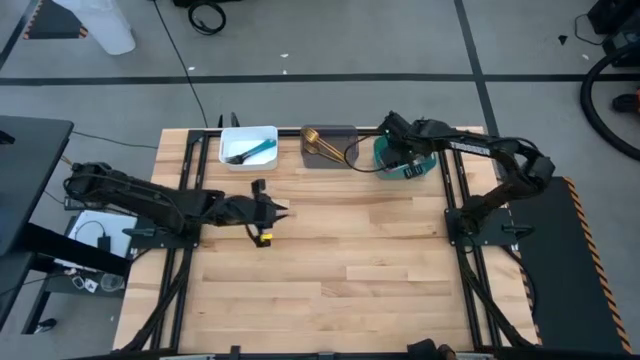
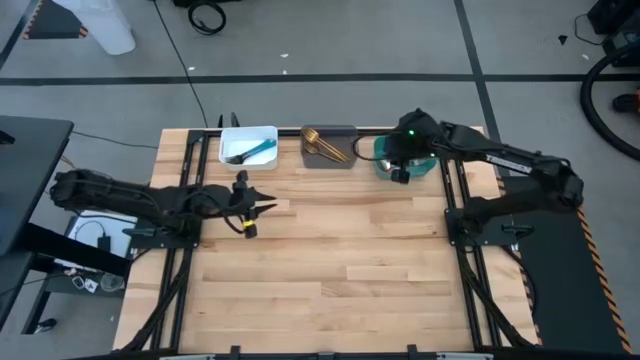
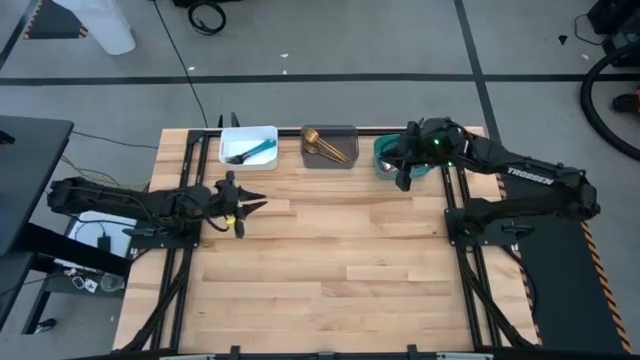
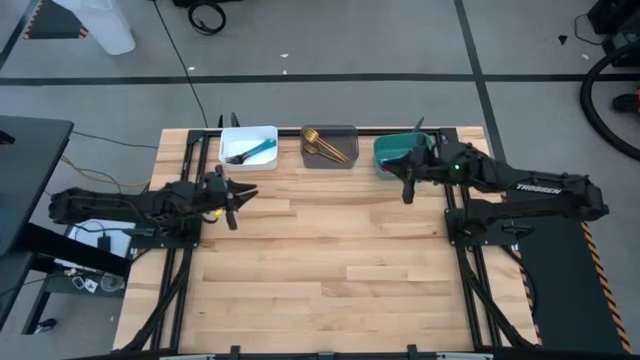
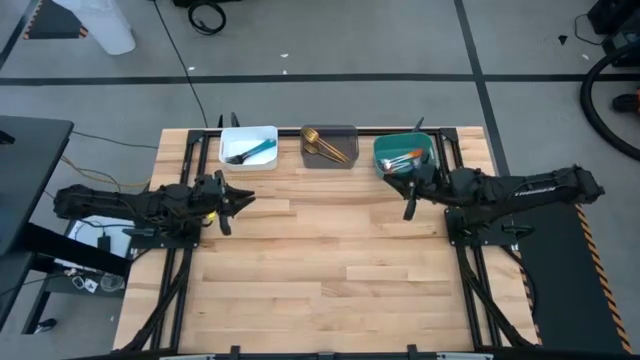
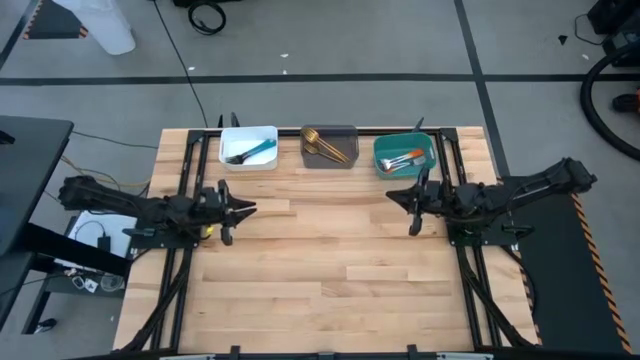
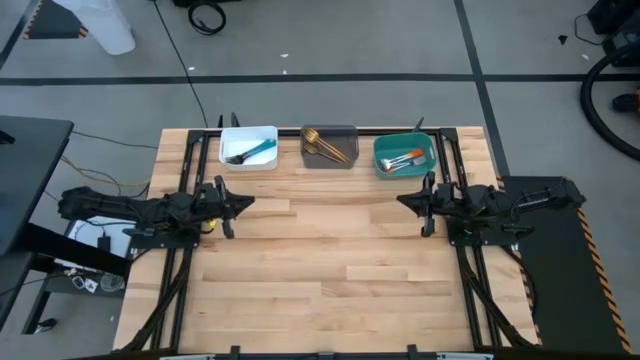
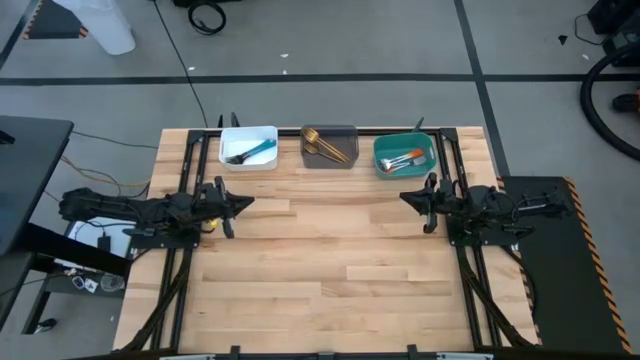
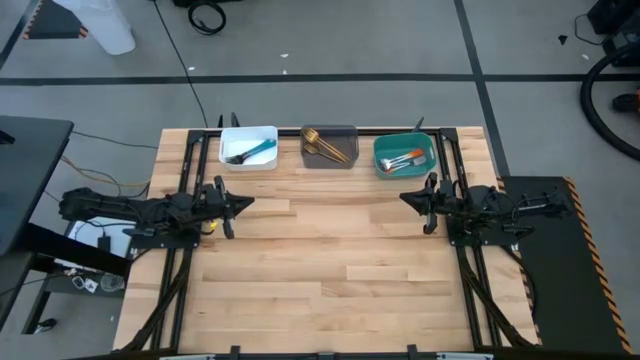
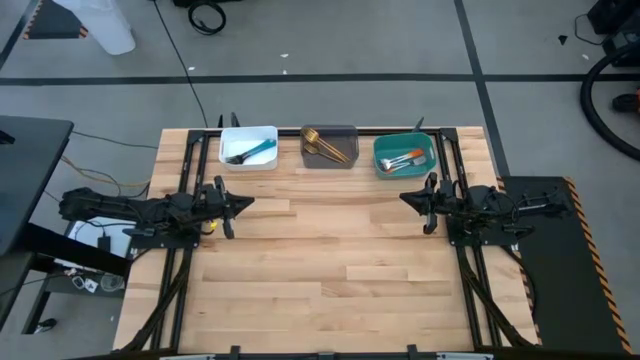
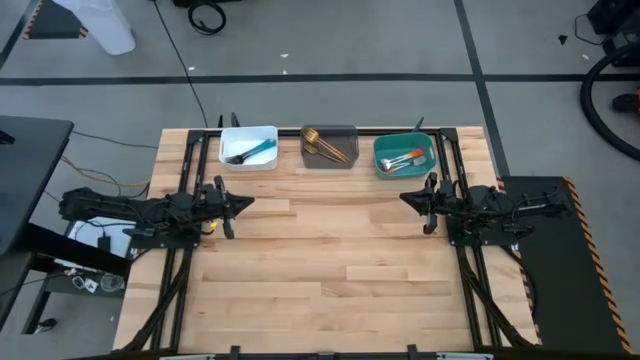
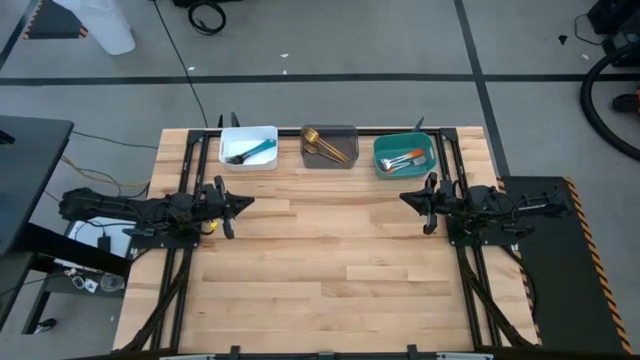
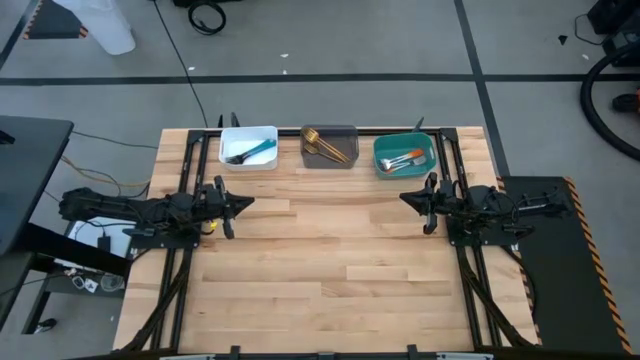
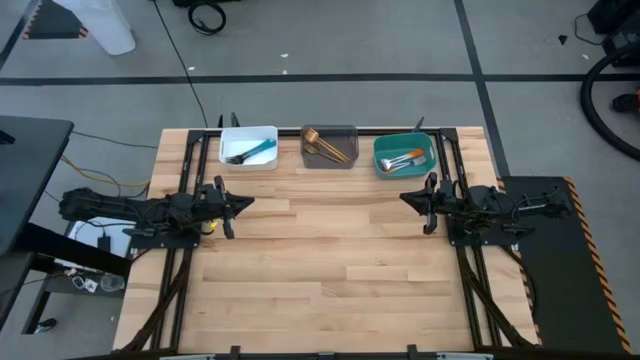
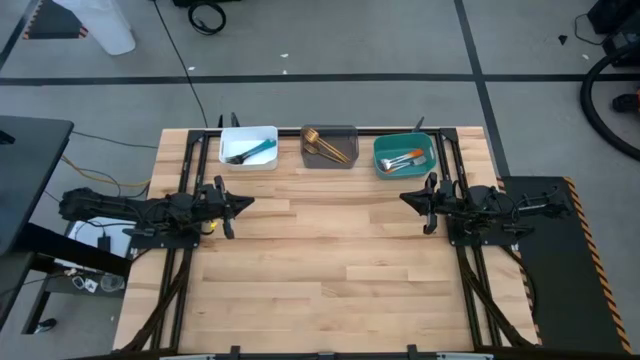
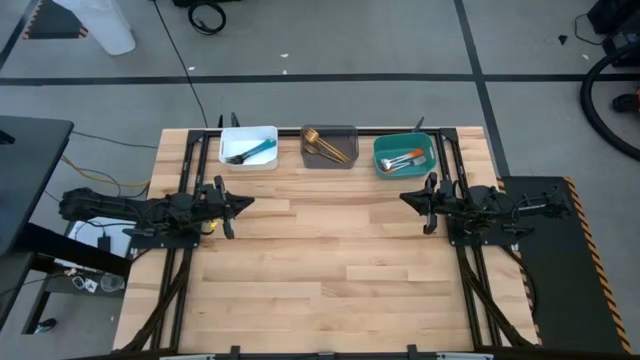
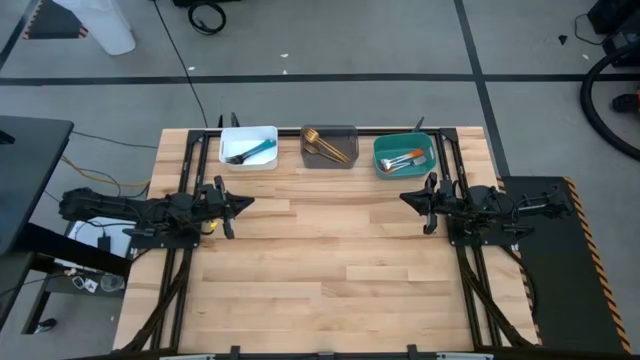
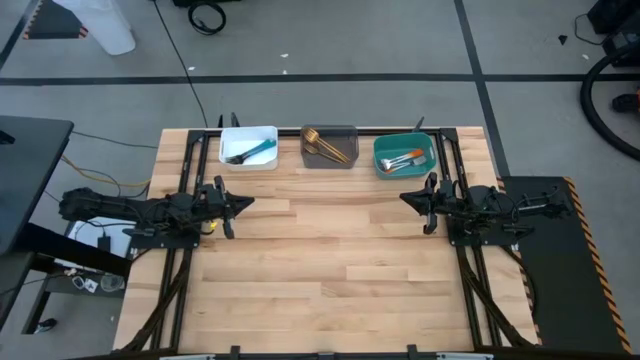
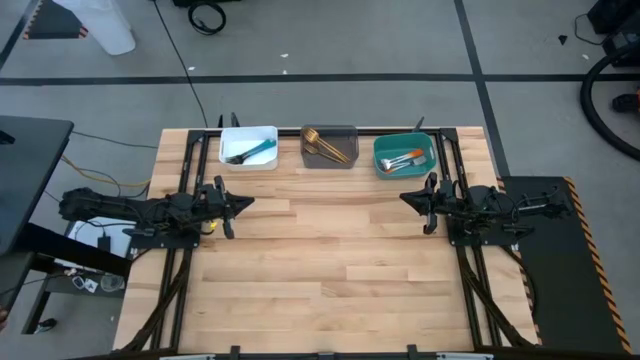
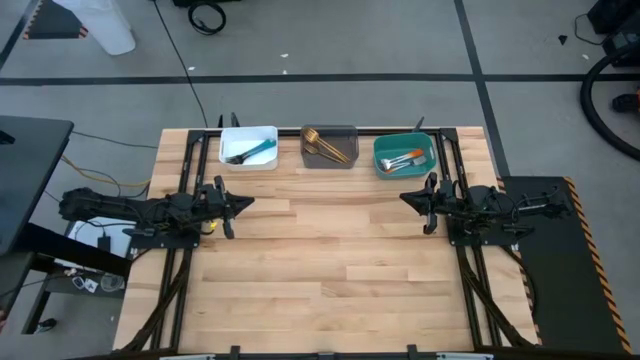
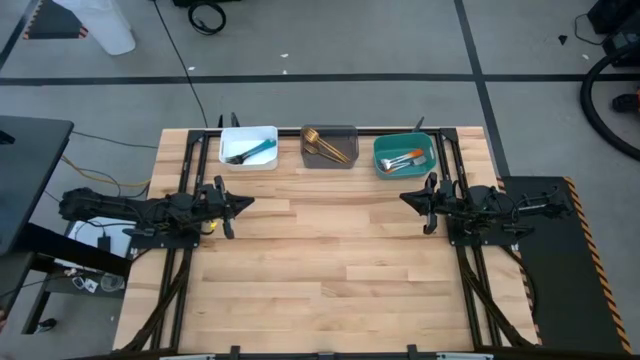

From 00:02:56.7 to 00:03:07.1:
Task: Sort silverware by color (type)
Return to Home Position

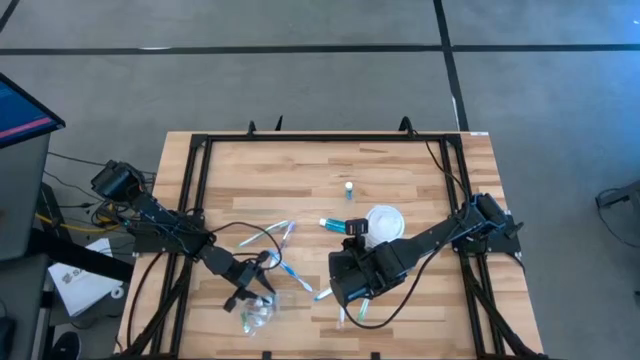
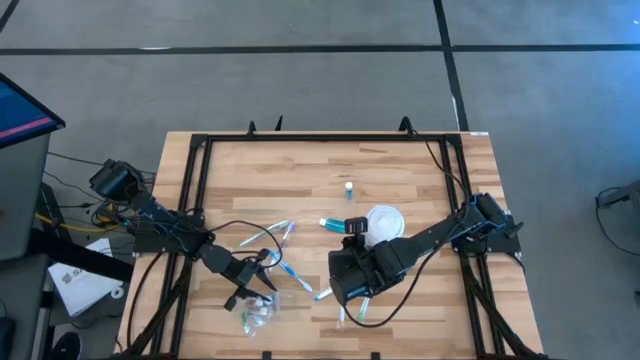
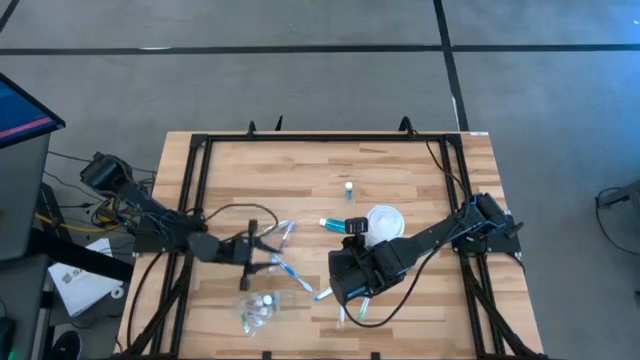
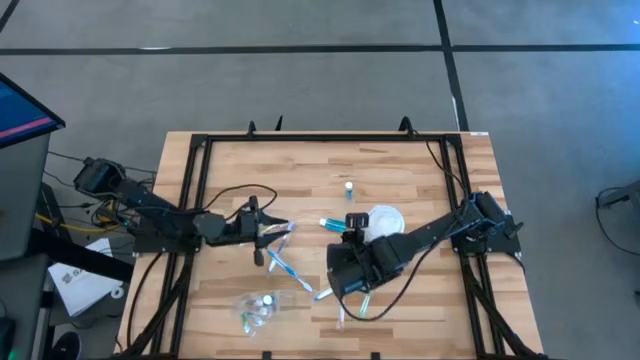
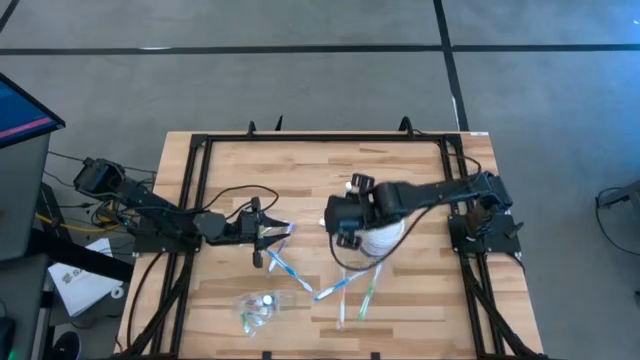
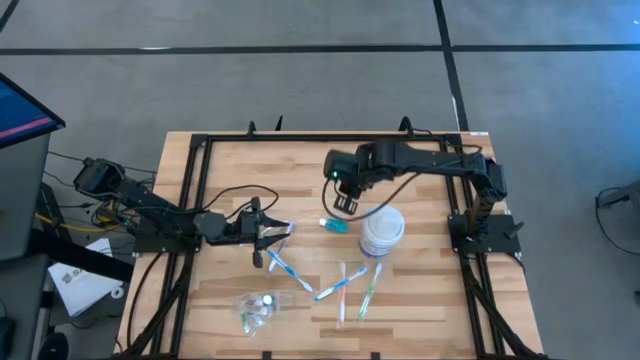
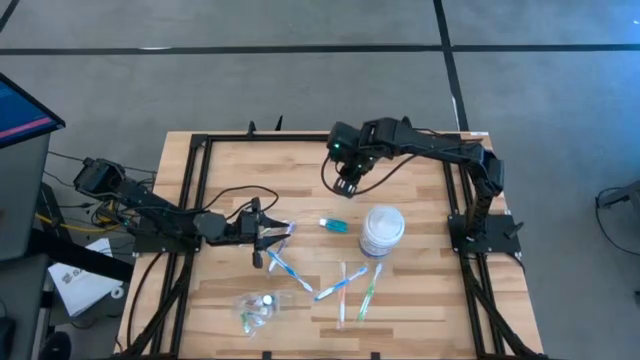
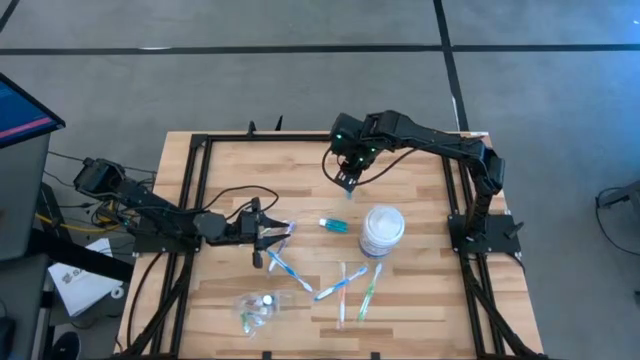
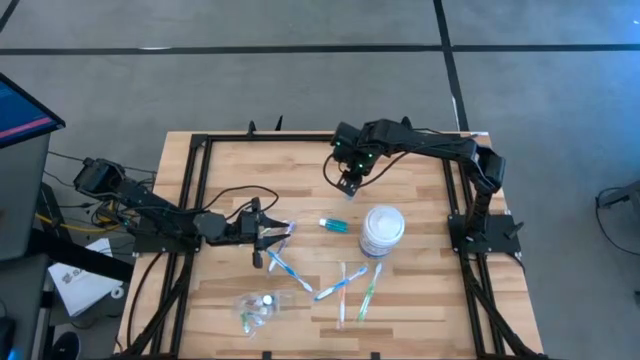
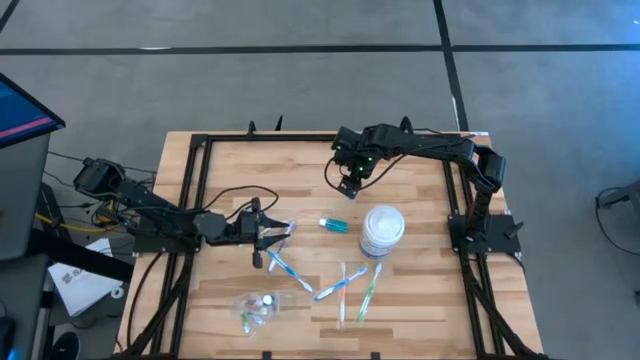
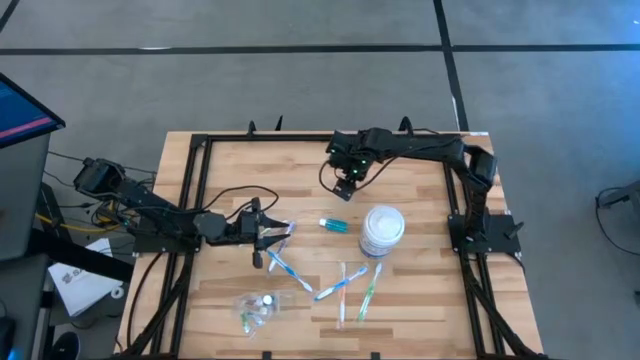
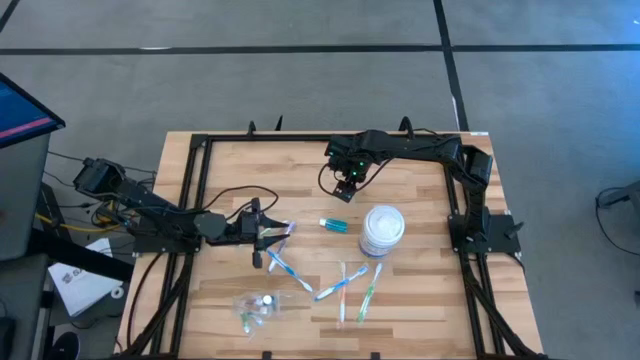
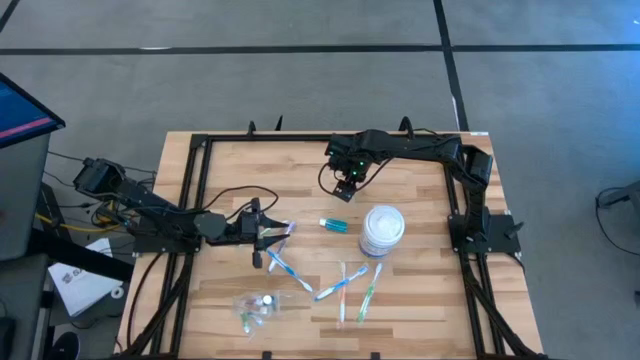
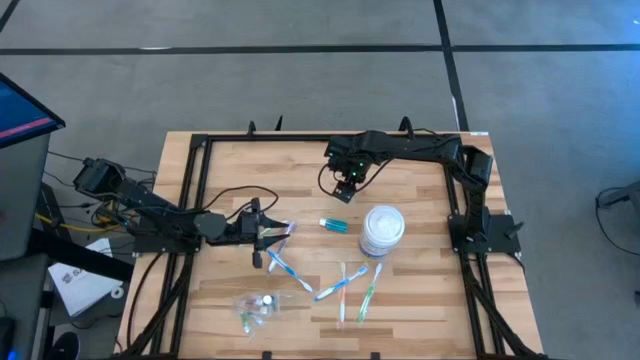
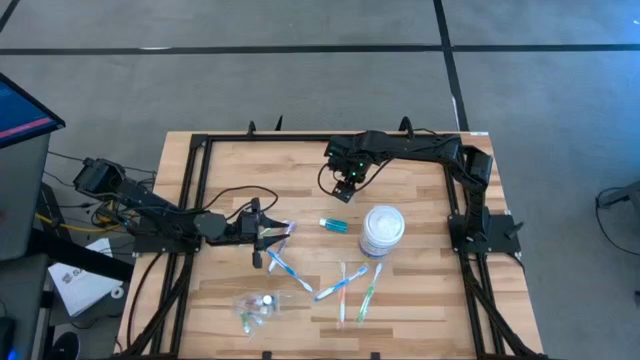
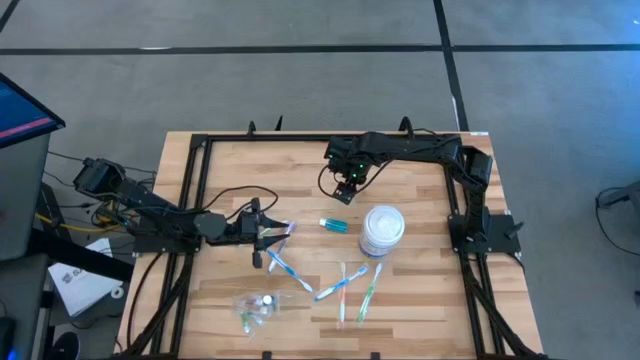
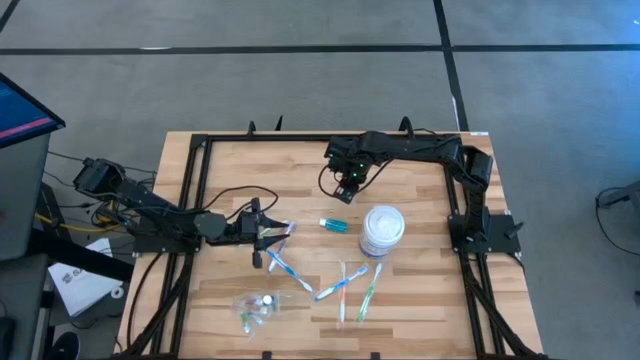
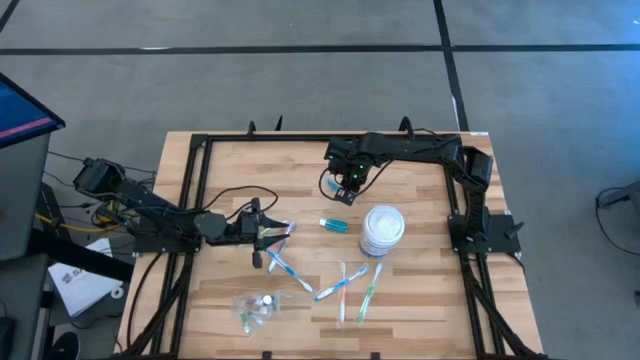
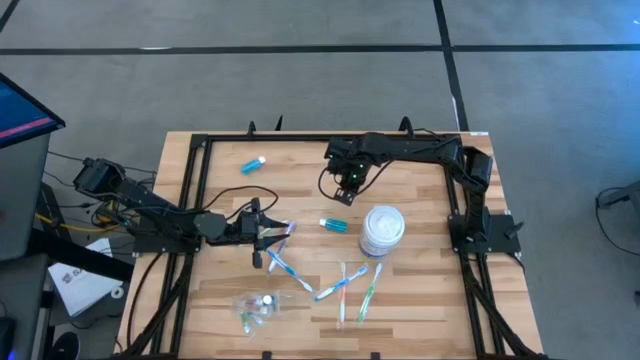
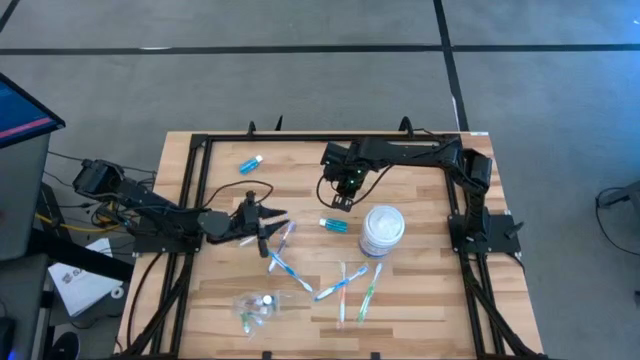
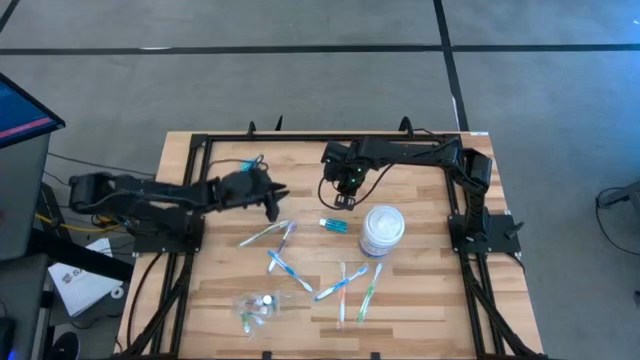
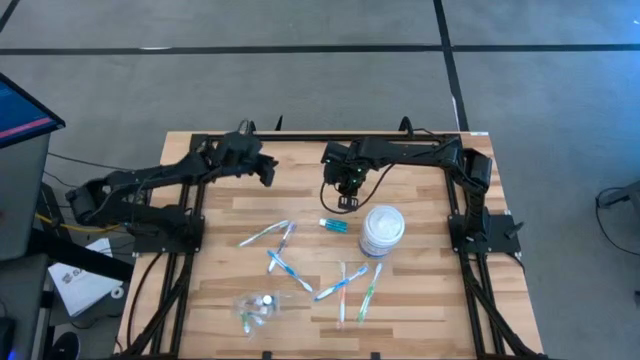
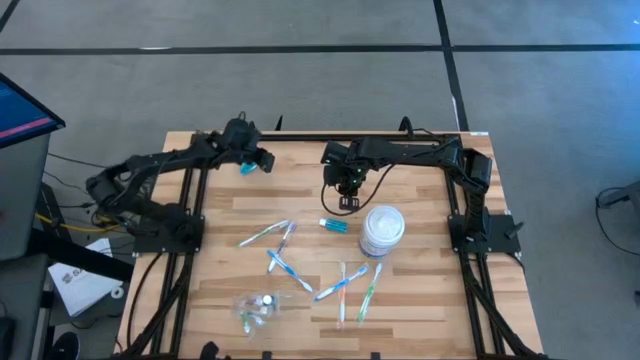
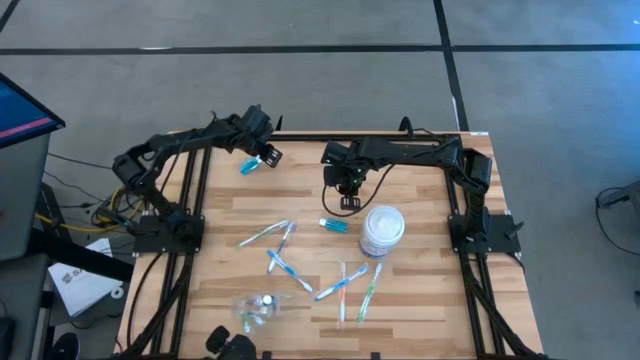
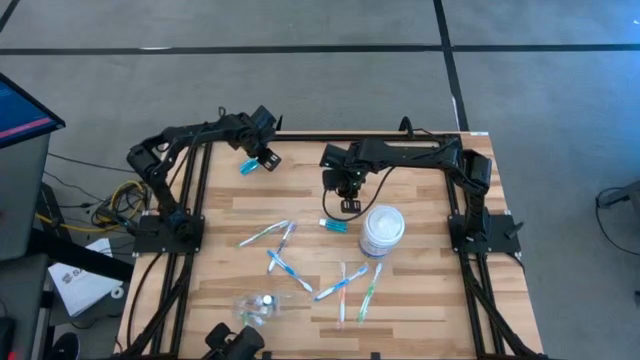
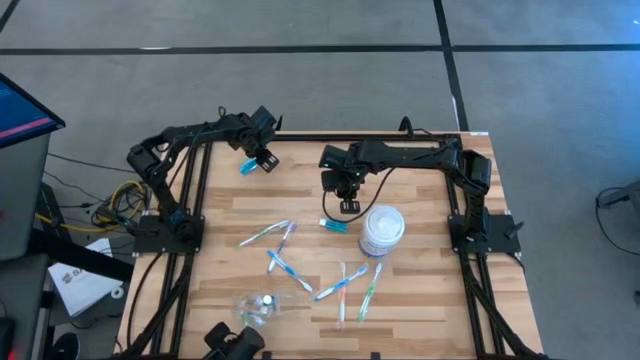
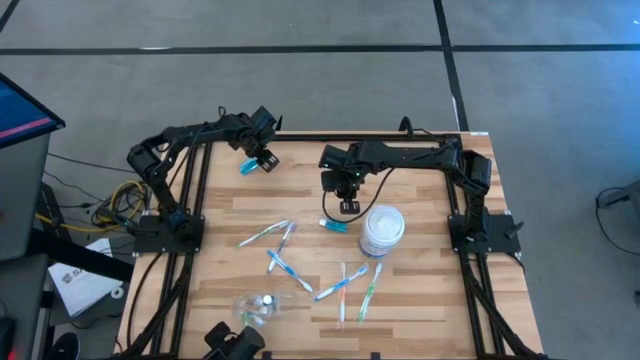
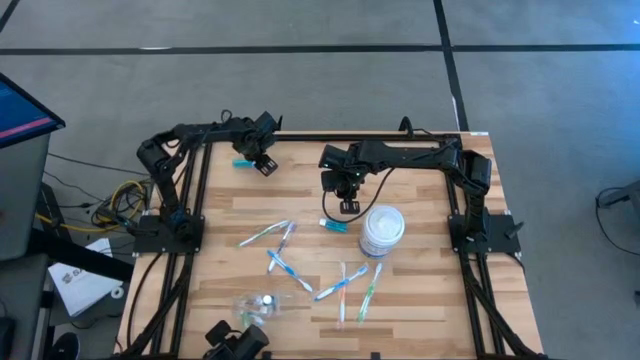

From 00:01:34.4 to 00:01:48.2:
Task: Pick & Place toothbrushing station
Put the top blue mouthwash into the transparent organizer
